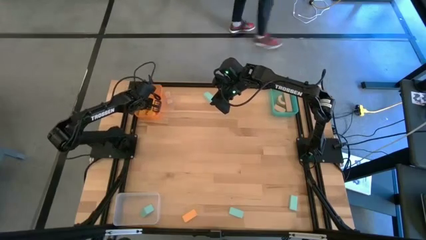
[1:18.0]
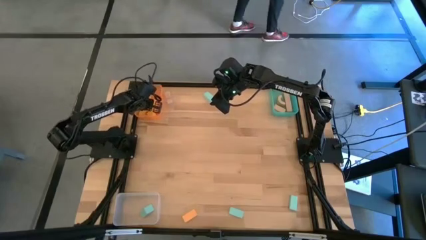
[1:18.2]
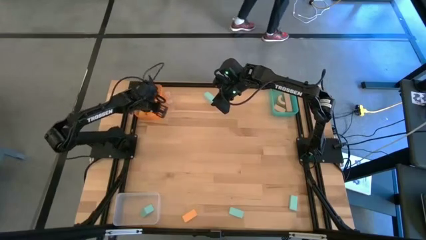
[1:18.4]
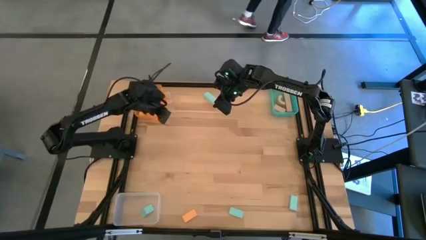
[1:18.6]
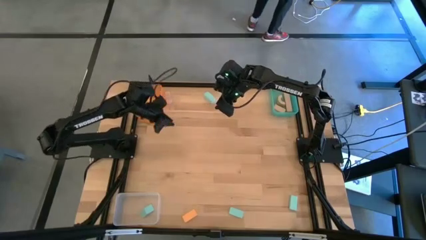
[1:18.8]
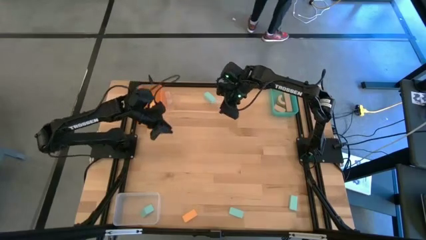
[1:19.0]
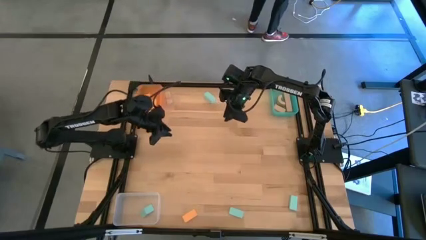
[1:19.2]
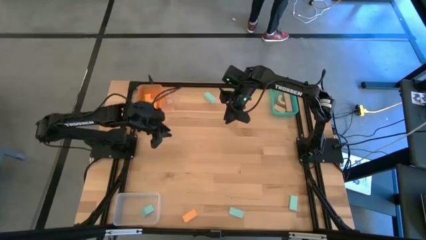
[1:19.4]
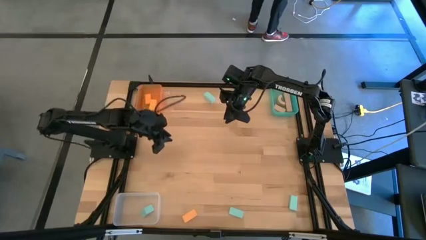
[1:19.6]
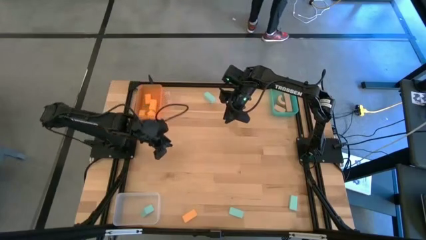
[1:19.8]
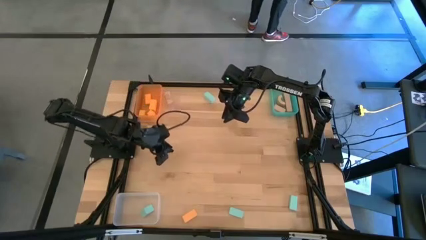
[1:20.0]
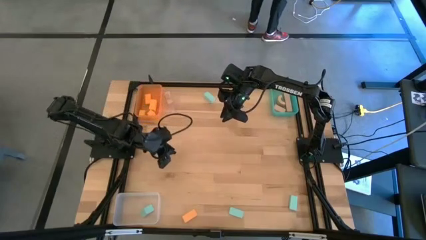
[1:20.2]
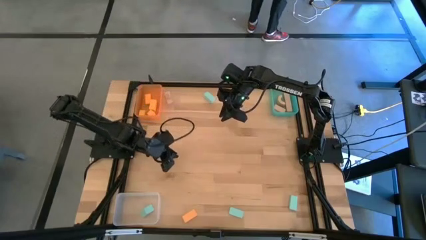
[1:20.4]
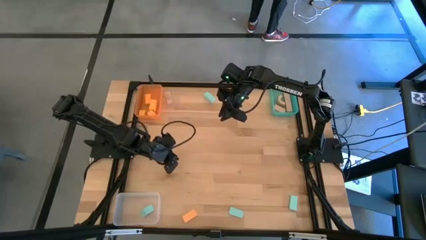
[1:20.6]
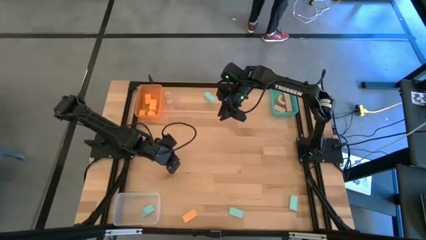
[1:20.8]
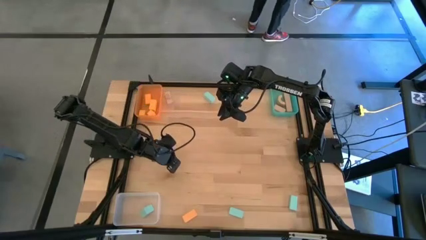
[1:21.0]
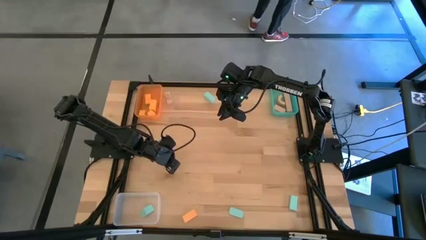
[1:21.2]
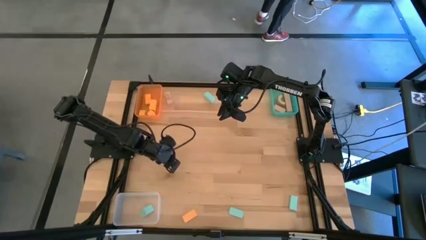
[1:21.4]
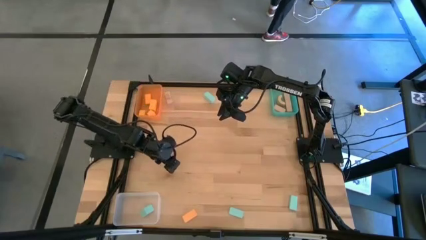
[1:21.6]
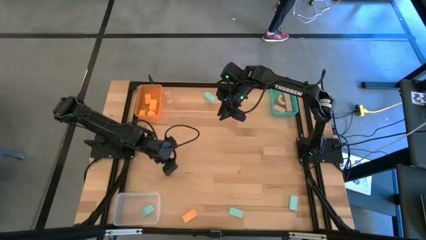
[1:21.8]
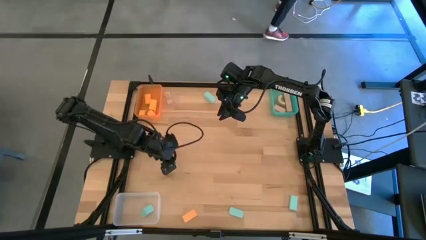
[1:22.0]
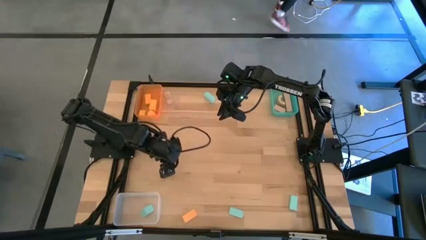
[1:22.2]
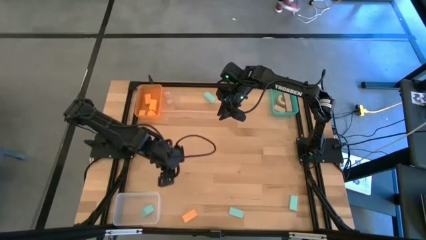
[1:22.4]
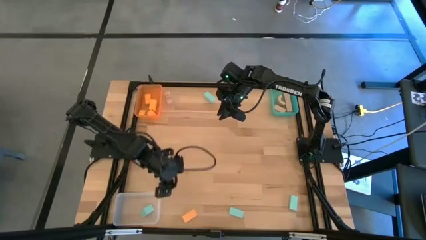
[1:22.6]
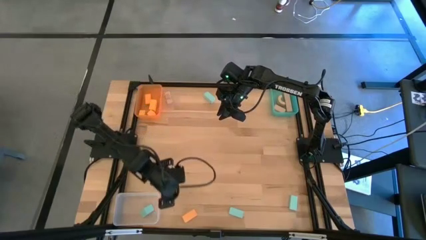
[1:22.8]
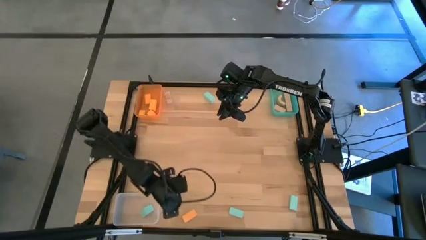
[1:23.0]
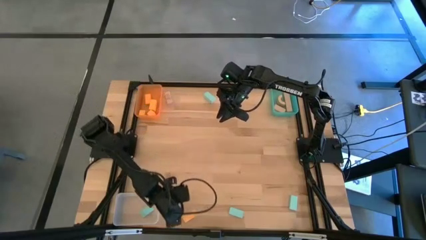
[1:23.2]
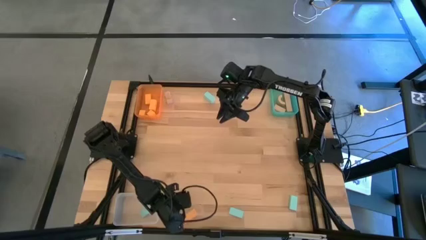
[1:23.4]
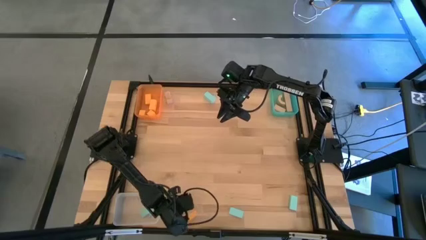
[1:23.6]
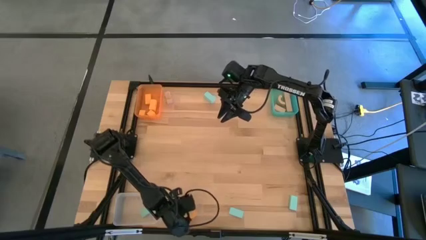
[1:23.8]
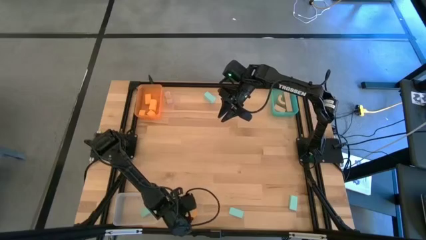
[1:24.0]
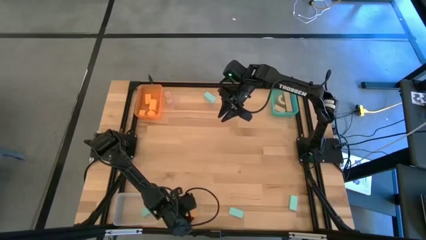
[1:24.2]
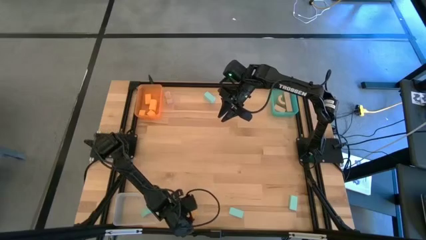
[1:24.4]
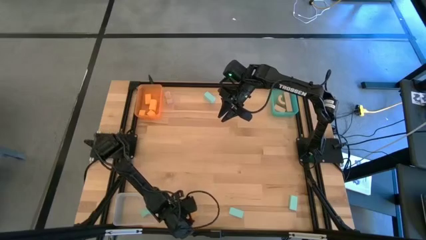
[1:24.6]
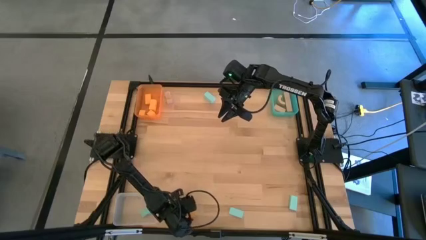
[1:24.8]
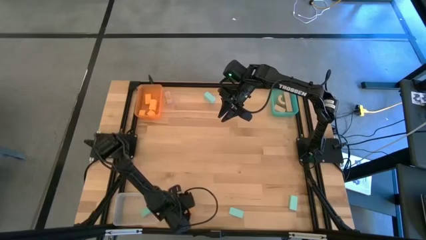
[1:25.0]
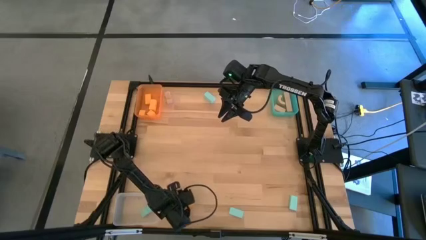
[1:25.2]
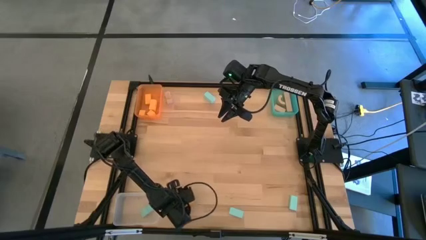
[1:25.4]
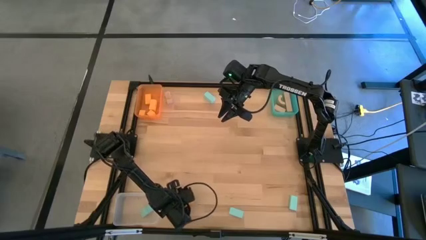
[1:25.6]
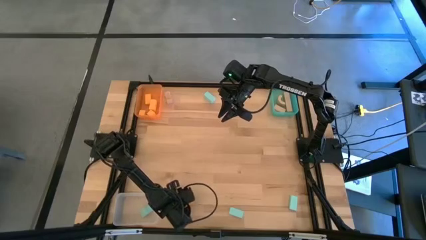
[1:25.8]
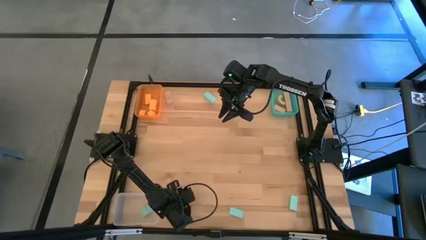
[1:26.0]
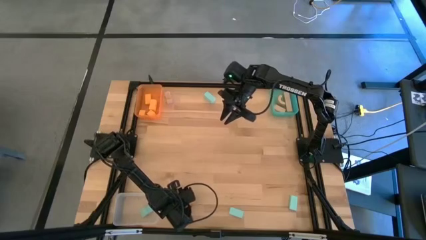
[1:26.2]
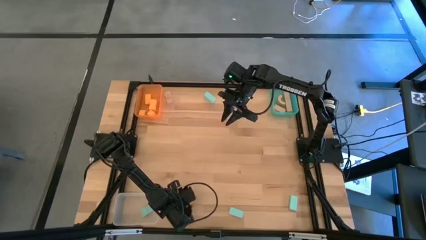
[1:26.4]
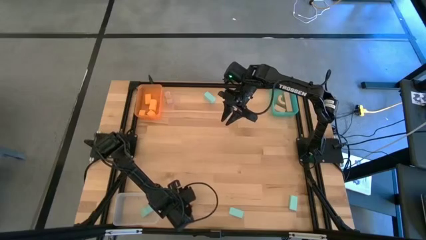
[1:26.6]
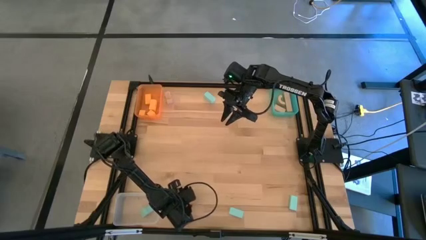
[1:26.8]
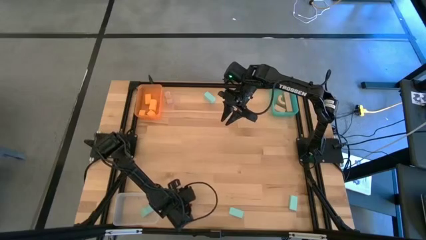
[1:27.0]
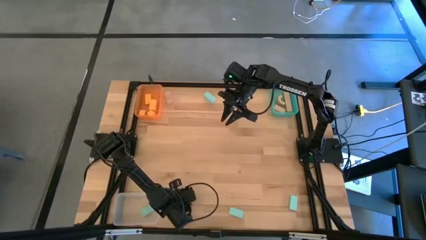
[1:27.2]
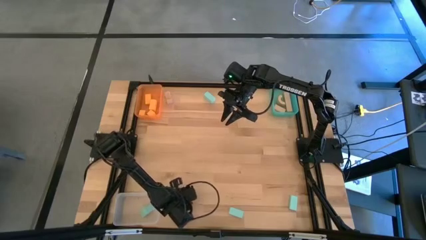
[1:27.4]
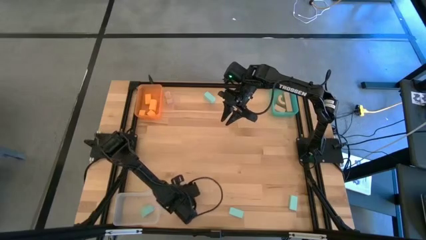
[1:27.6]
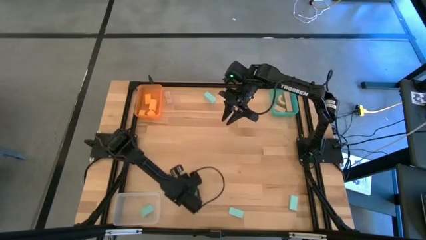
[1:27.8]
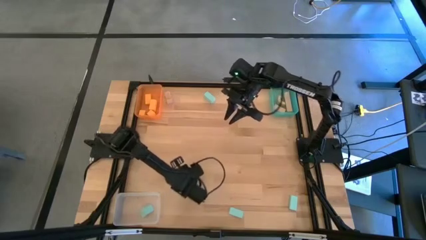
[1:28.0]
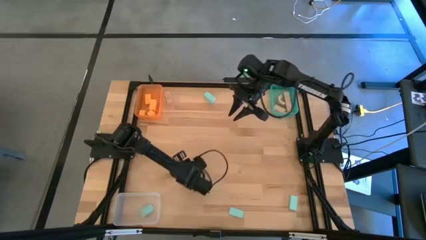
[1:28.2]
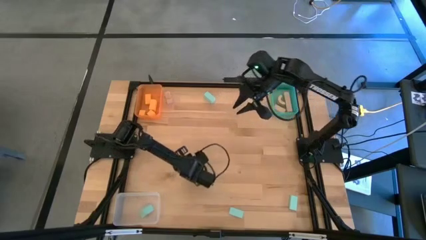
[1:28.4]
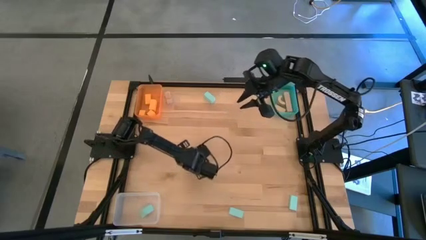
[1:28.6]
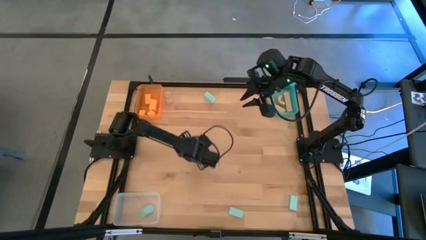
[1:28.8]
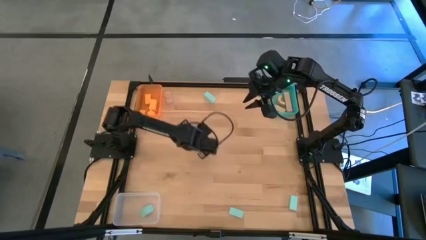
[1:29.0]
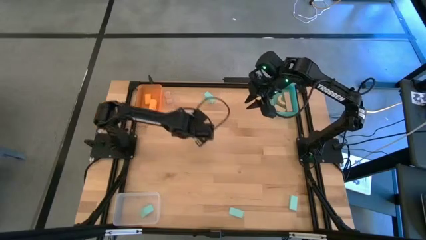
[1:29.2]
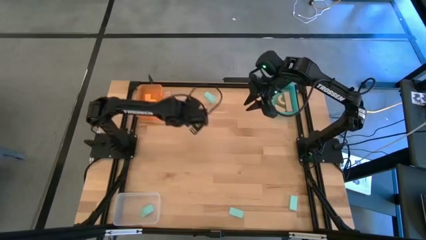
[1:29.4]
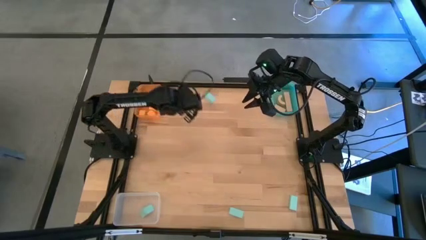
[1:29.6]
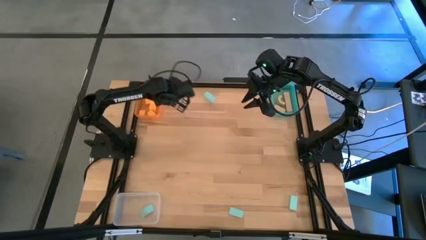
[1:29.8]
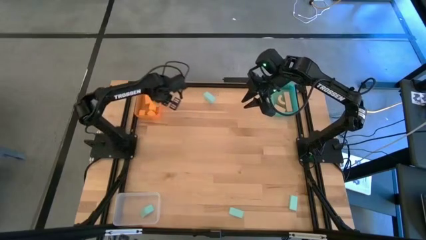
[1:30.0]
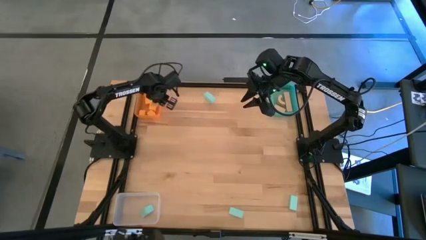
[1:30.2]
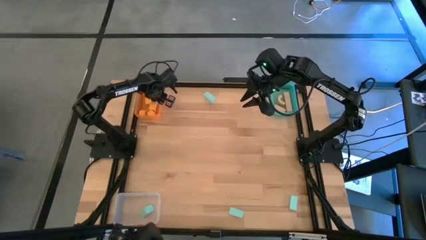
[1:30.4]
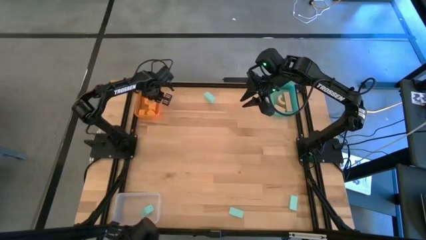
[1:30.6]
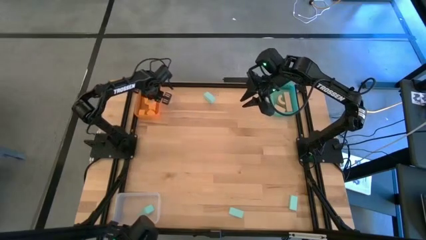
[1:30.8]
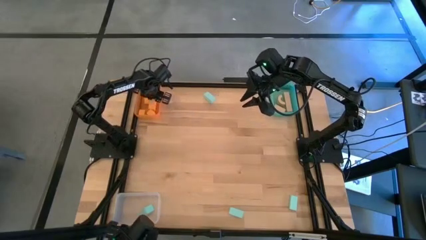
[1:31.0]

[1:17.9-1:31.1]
Task: Sort & place blocks by color
Put the orange block into the orange bin

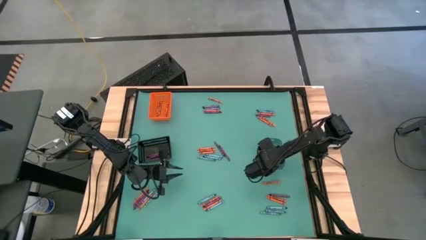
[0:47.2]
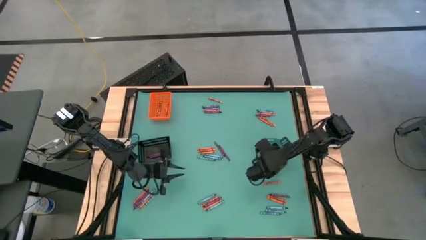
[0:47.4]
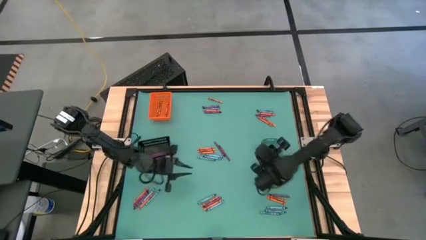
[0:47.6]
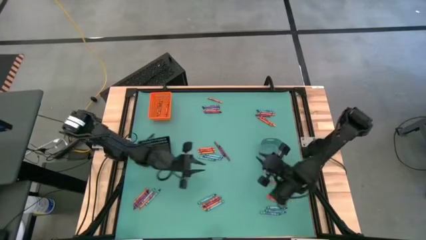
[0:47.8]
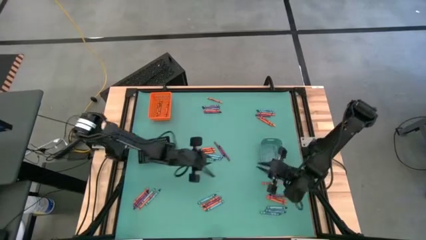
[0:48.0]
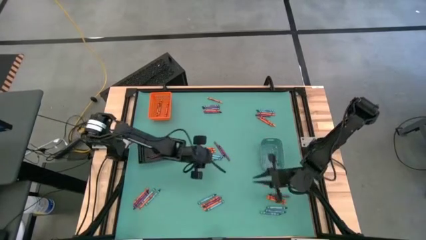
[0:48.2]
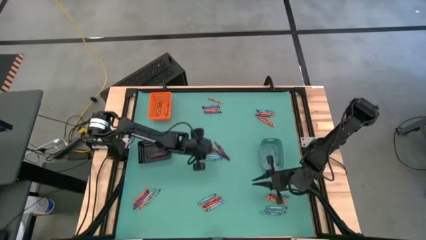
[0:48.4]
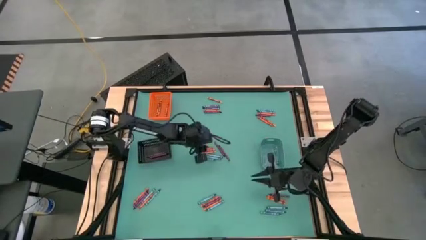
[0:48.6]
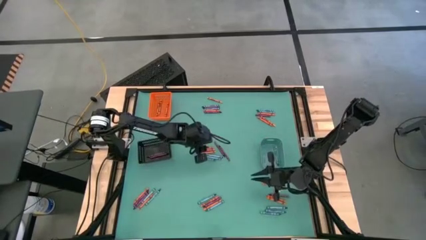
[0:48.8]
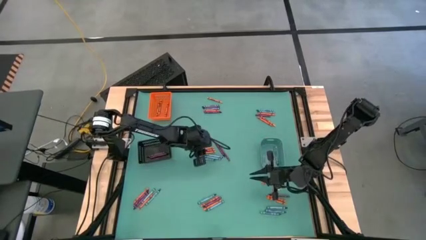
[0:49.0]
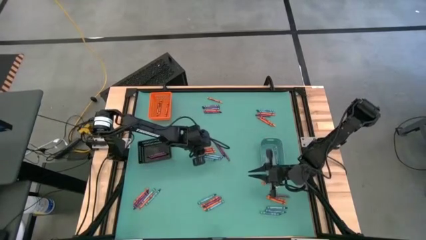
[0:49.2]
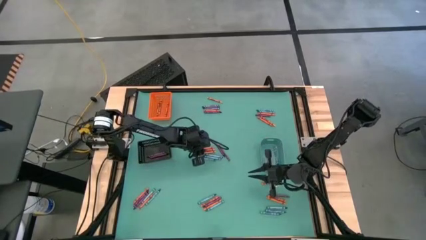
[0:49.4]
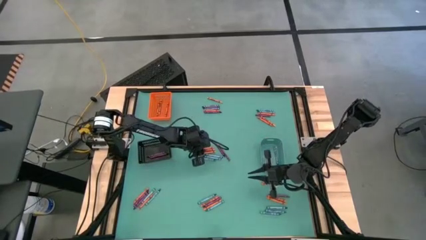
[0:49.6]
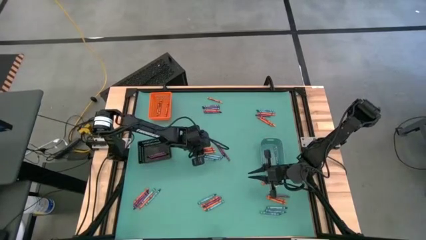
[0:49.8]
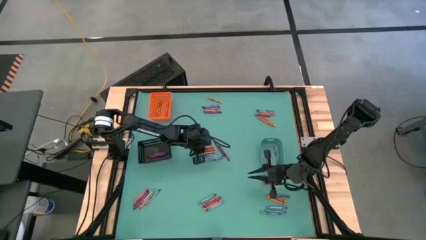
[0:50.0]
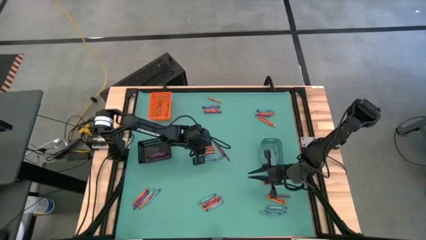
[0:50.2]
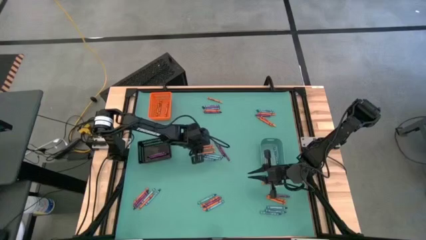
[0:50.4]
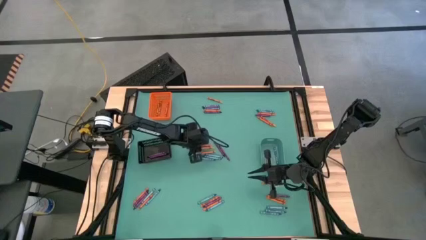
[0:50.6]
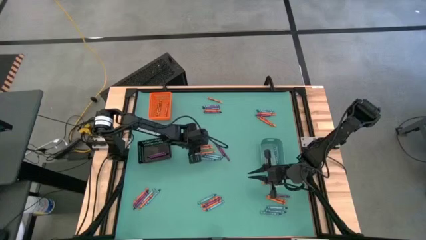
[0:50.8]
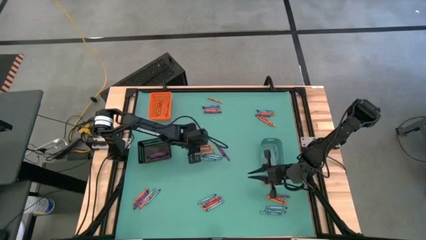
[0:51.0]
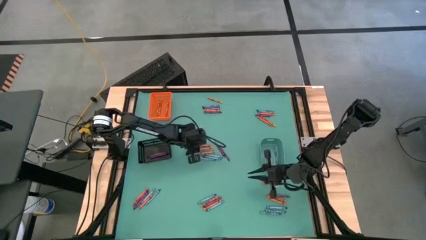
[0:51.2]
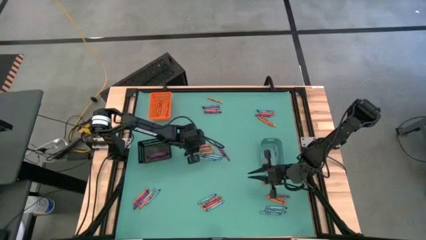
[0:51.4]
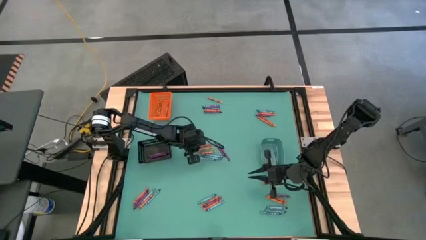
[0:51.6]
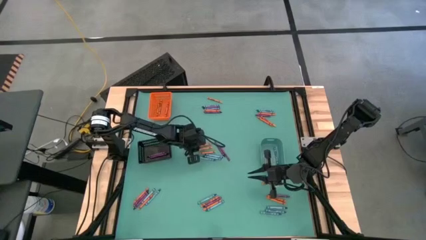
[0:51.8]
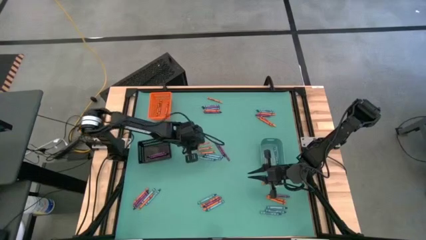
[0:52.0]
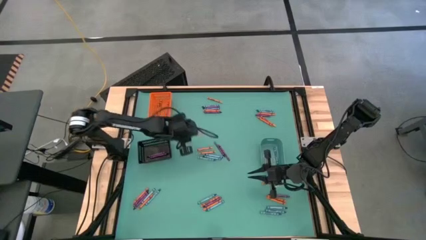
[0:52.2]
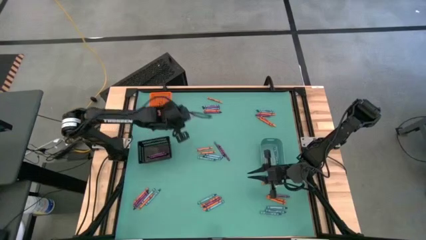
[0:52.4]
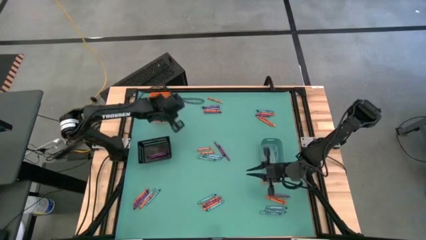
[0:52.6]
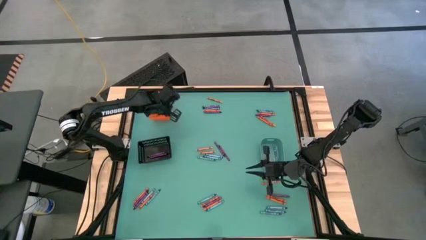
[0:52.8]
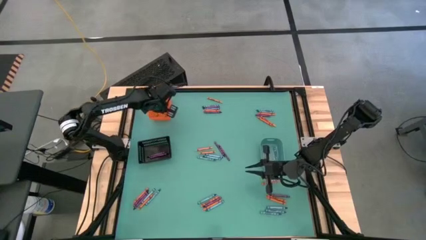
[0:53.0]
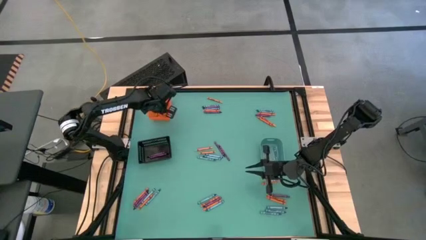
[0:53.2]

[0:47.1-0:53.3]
Task: Sort crayons
Put the orange crayon into the orange bin
